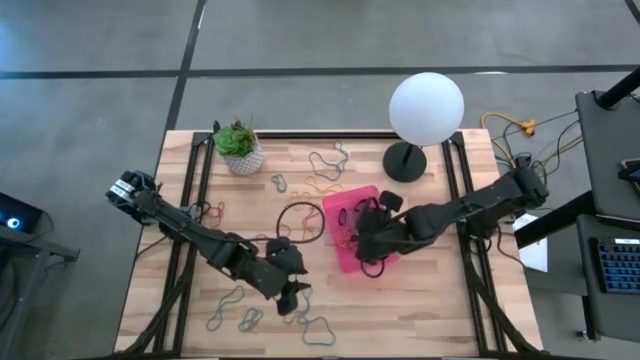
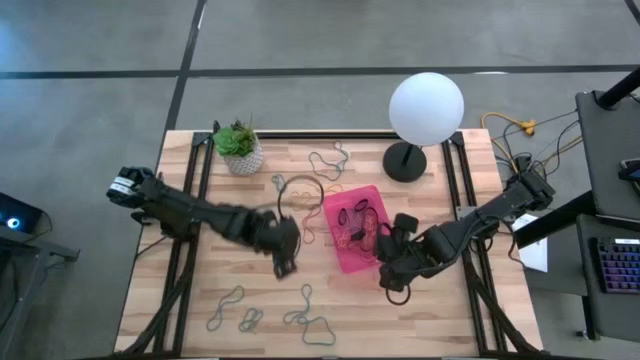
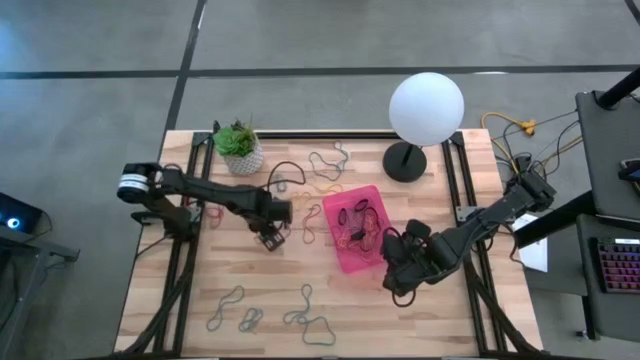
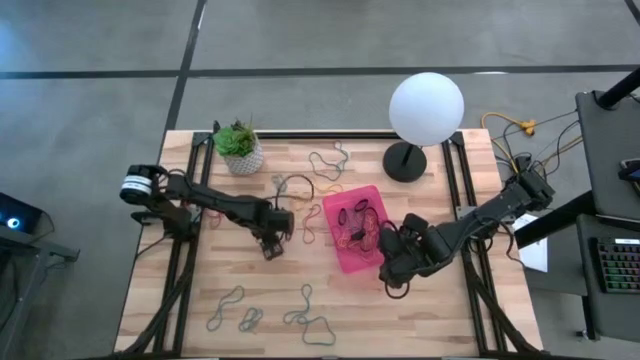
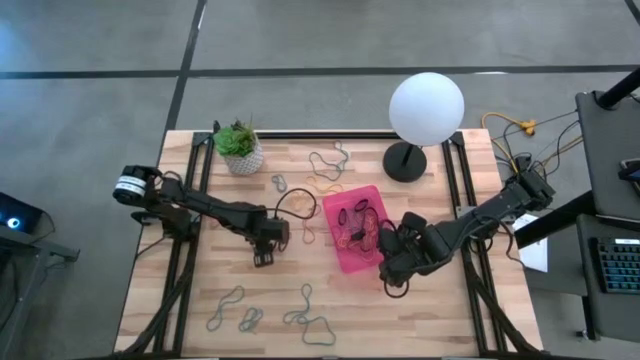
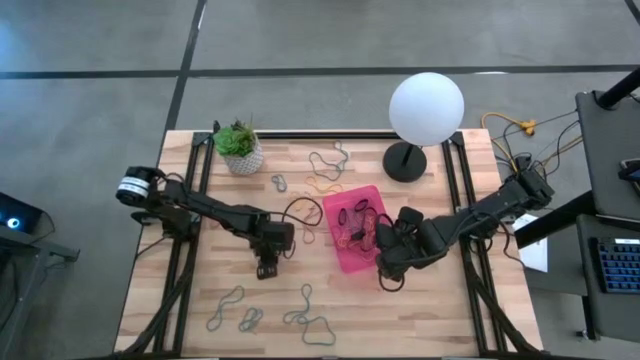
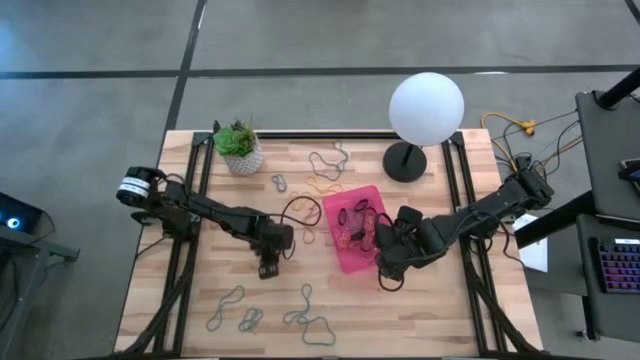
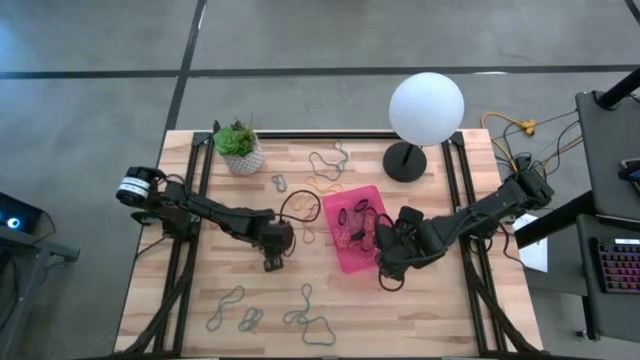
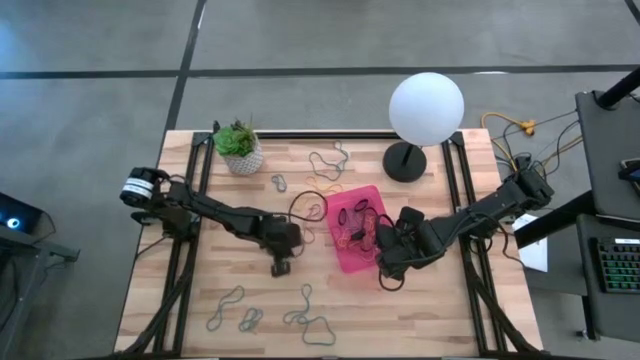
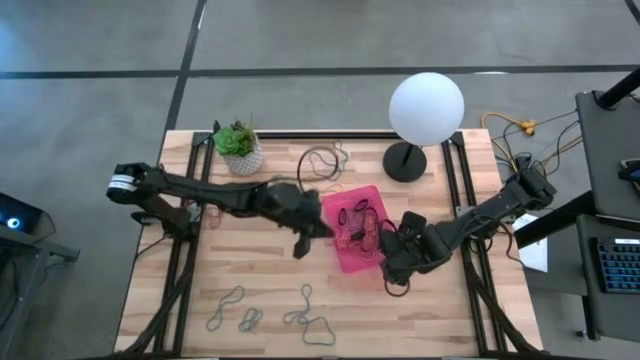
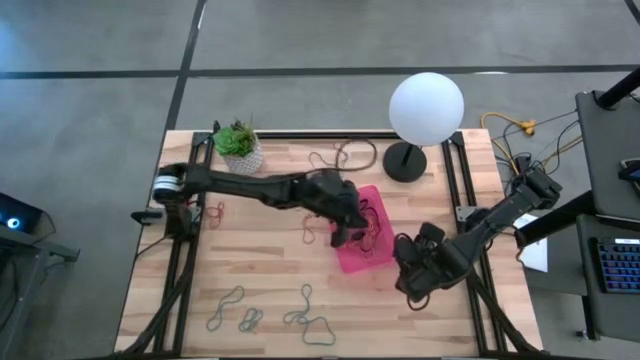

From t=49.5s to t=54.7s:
Task: Pick and place rubber bands into bin
Put the red rubber band into the pink bin

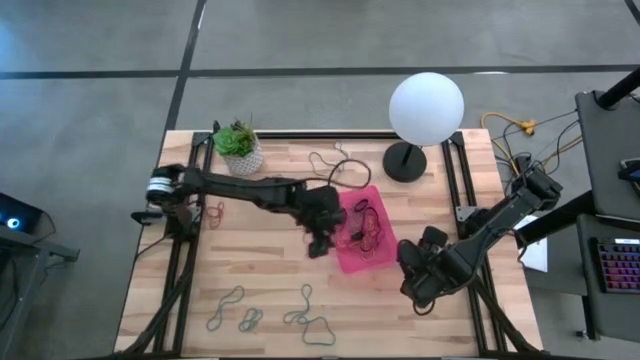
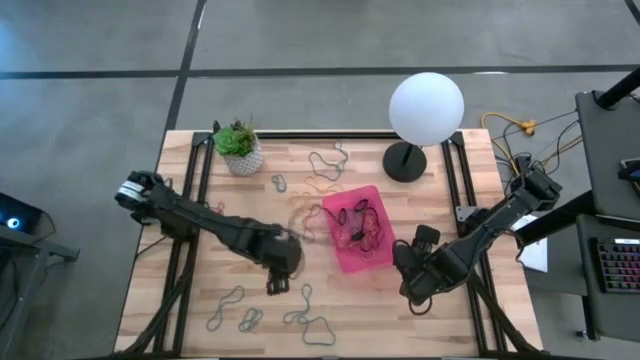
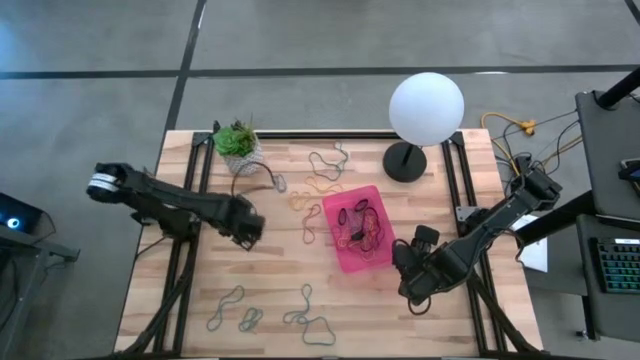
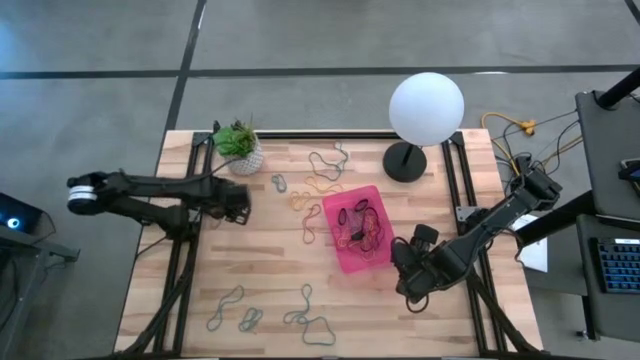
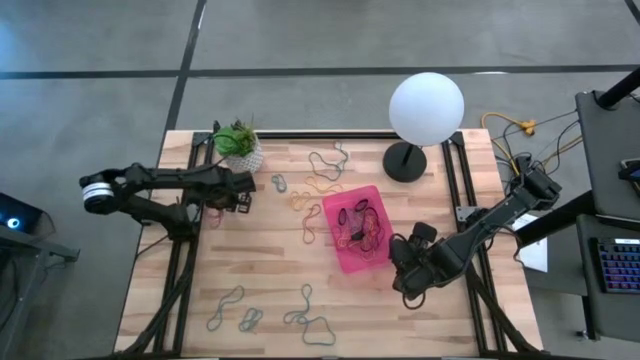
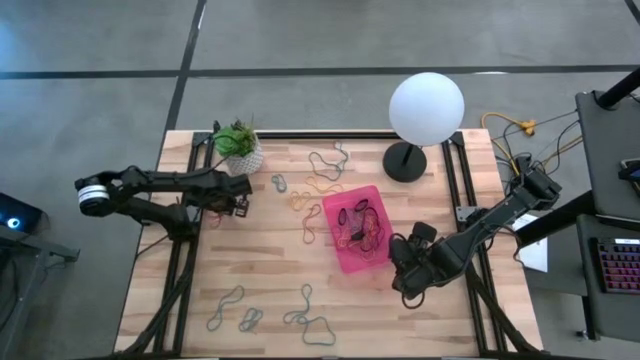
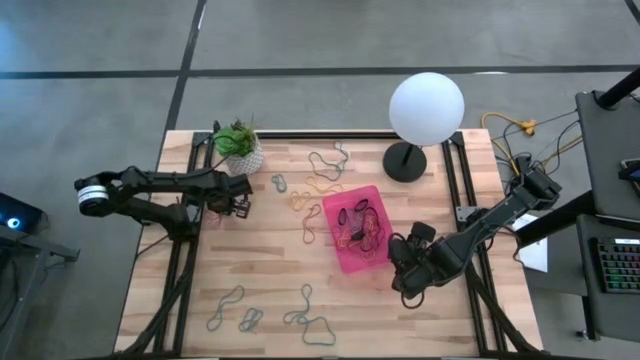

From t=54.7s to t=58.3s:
Put the red rubber band into the pink bin

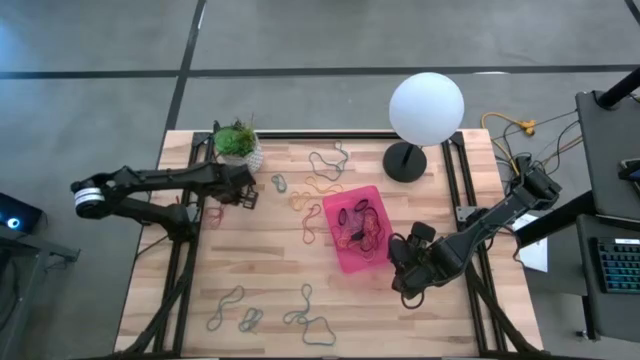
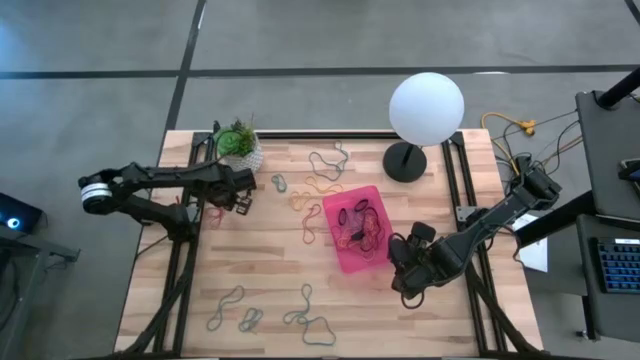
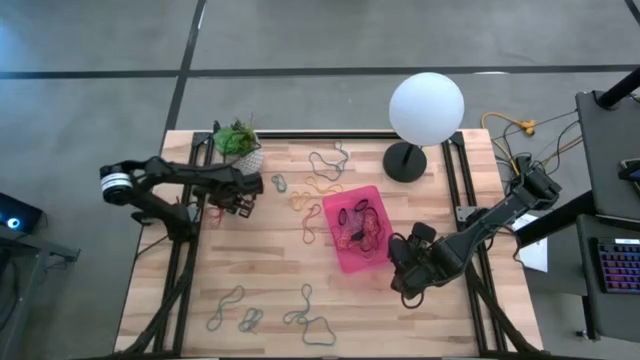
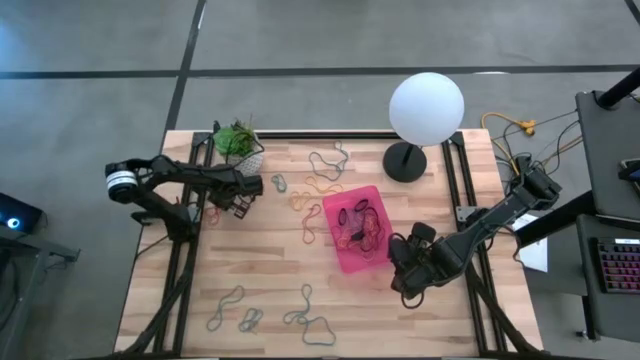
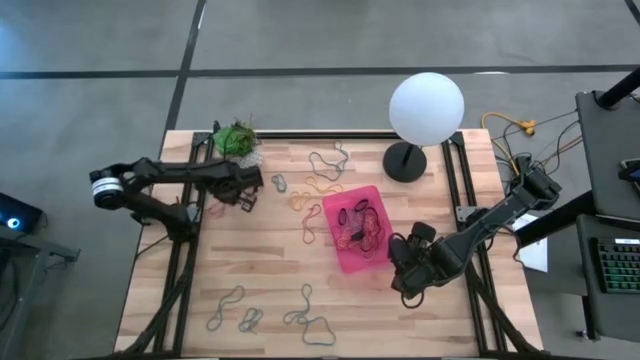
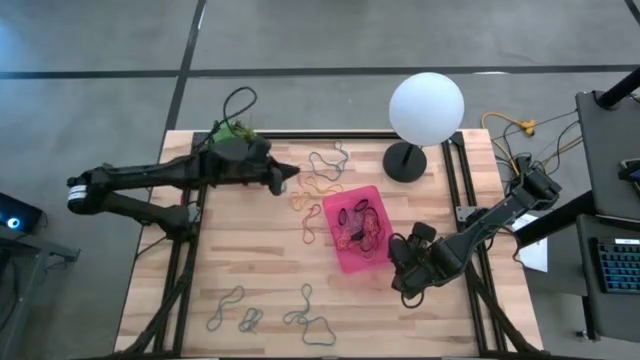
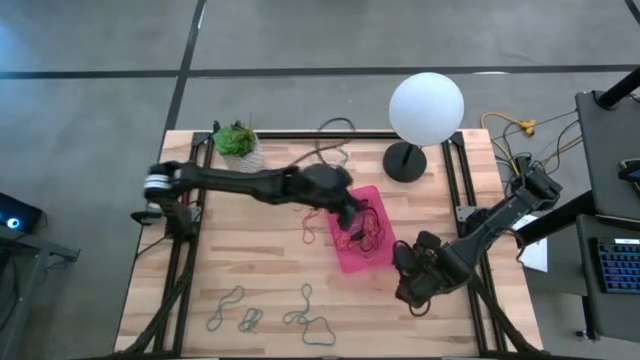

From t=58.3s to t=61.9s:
Put the red rubber band into the pink bin

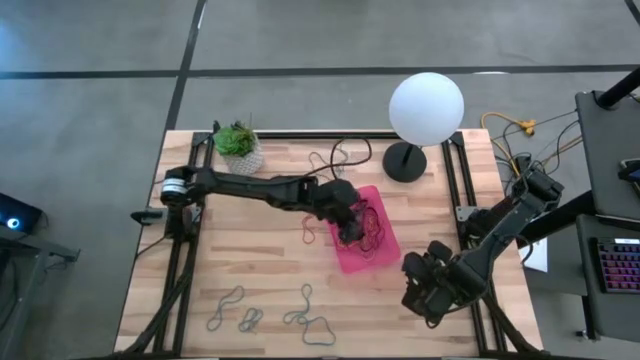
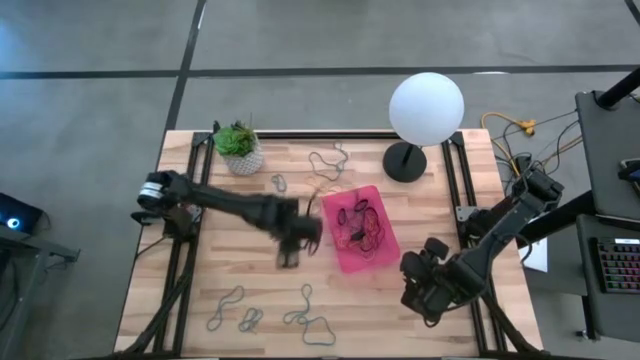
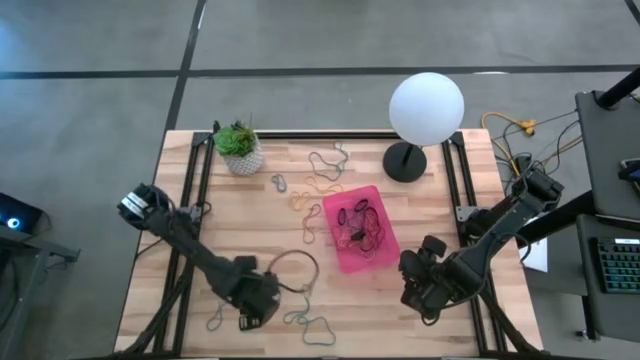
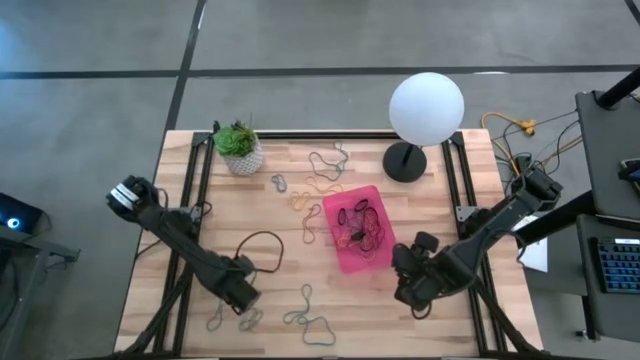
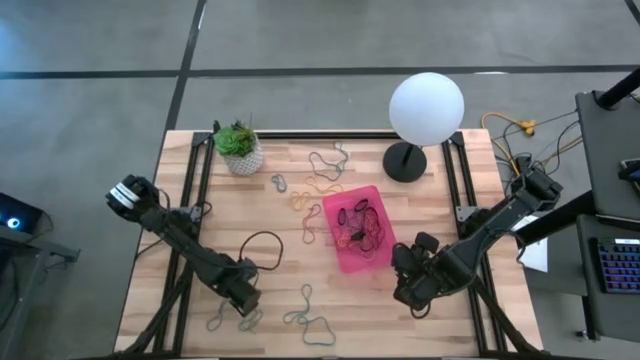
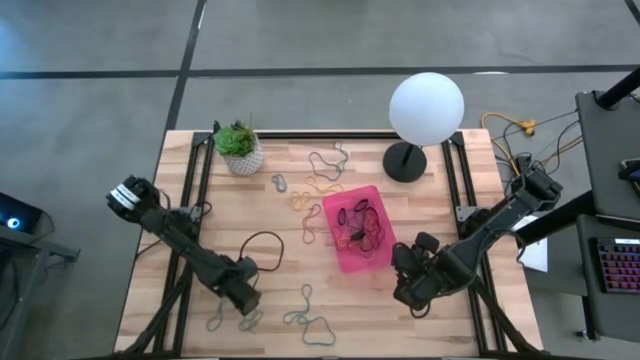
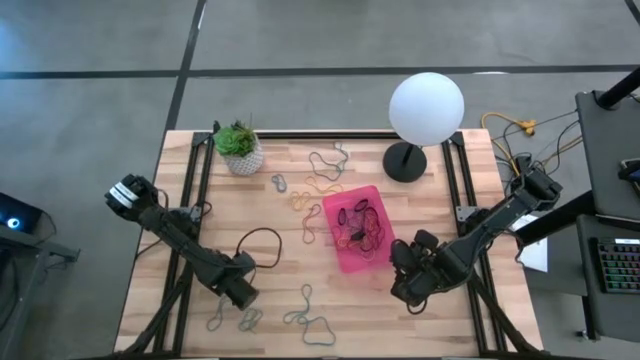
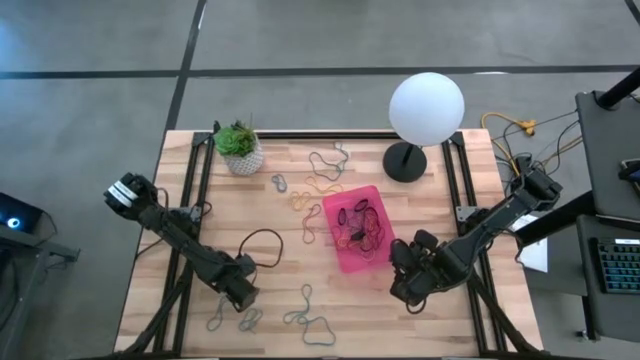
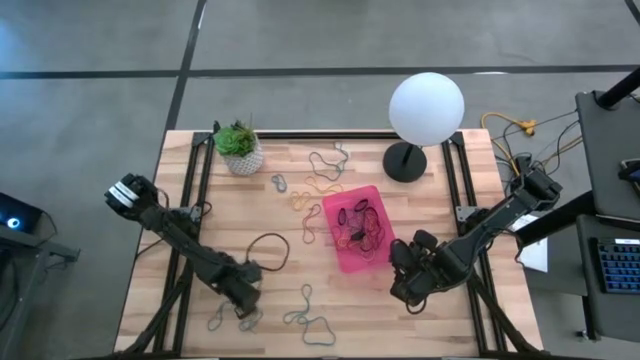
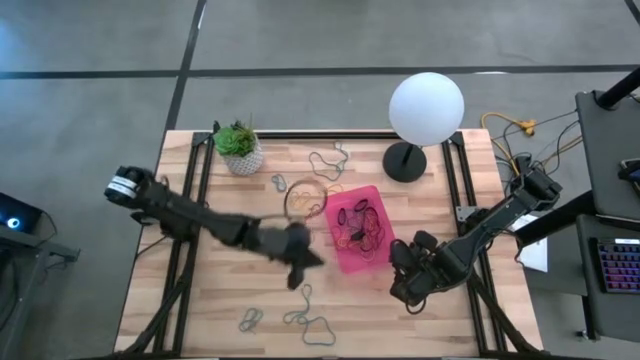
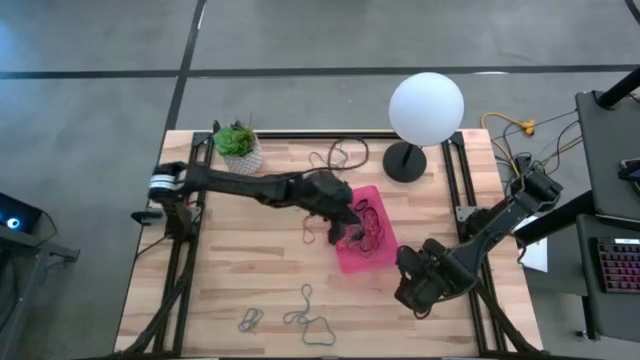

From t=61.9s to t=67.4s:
Put the blue rubber band into the pink bin

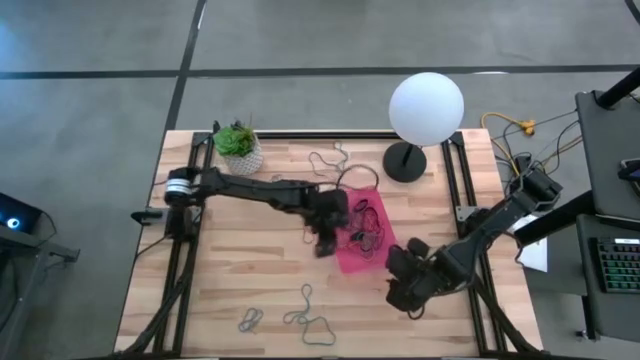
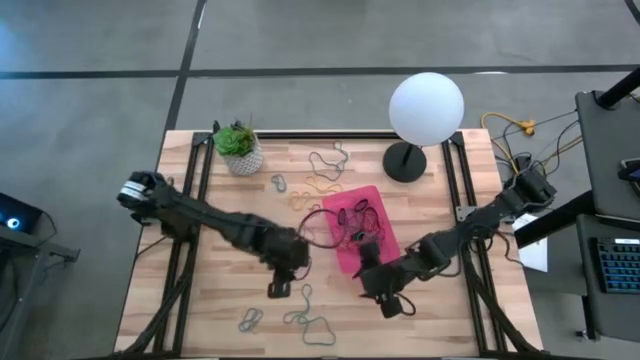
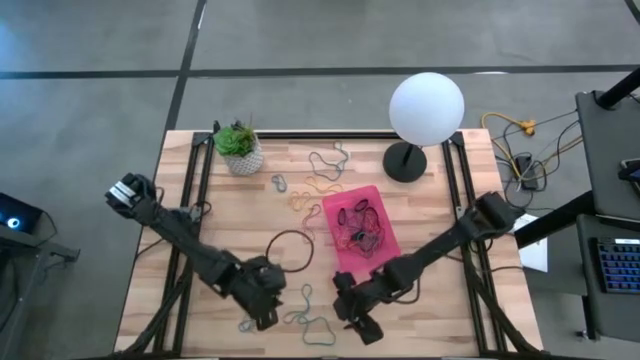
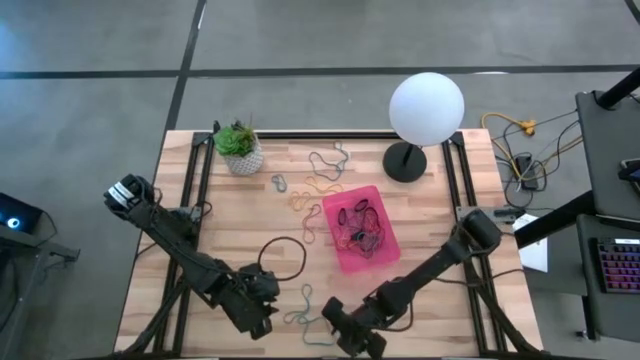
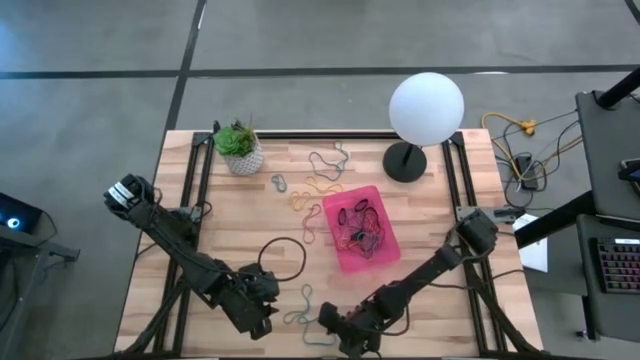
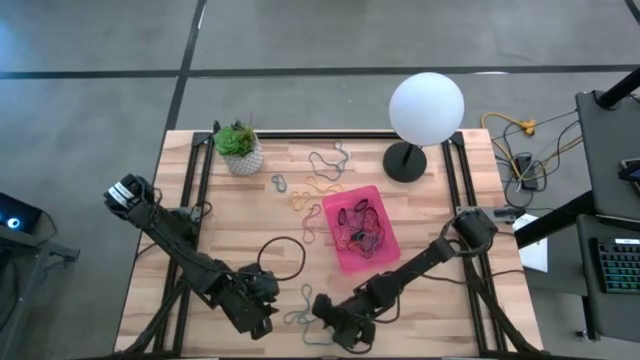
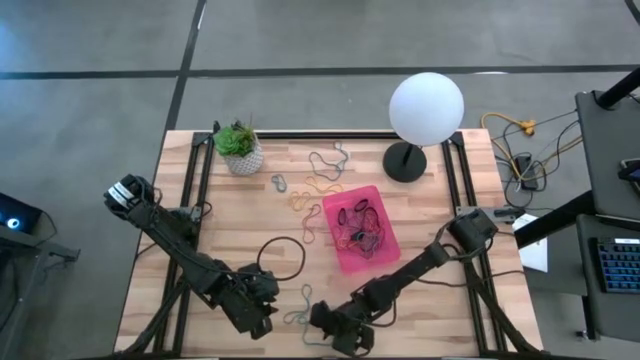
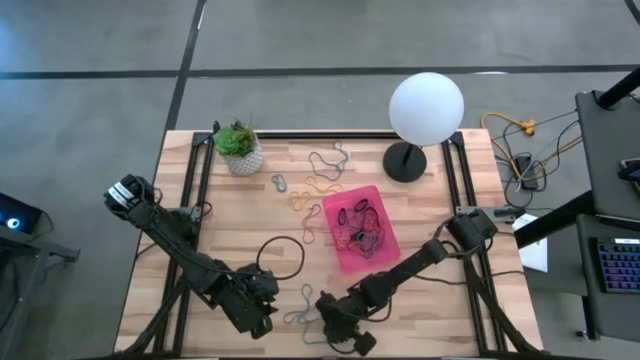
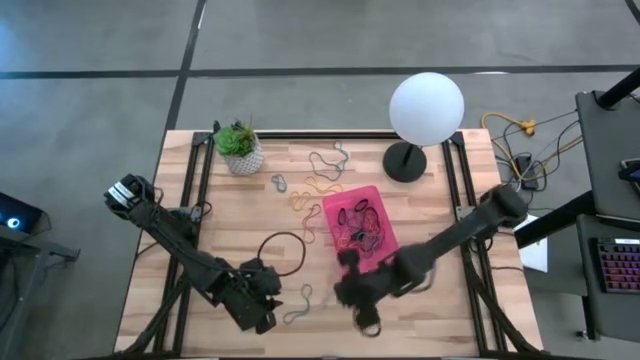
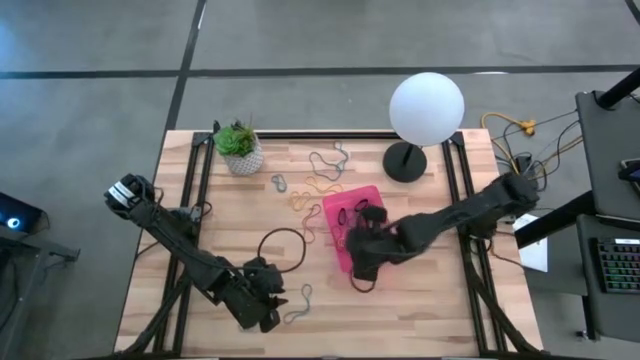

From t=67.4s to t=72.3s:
Put the blue rubber band into the pink bin
